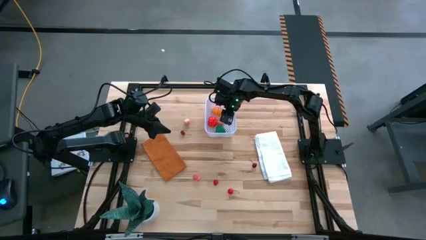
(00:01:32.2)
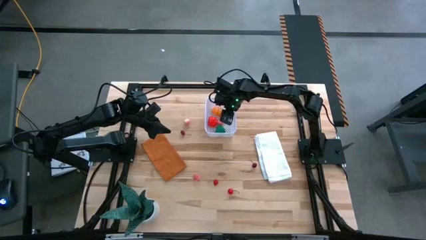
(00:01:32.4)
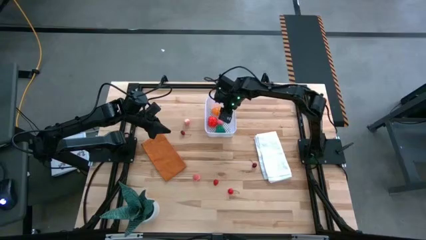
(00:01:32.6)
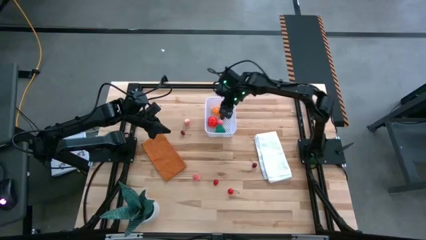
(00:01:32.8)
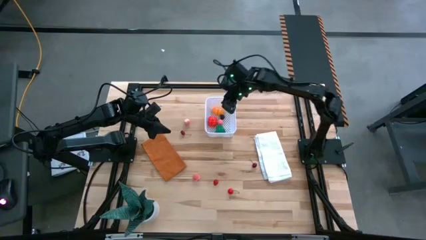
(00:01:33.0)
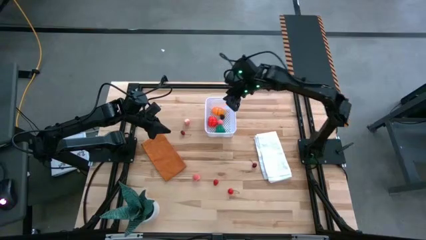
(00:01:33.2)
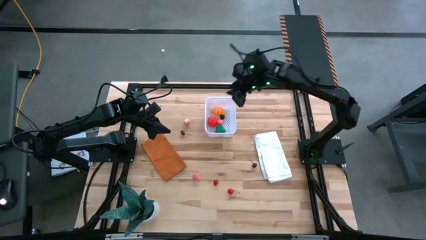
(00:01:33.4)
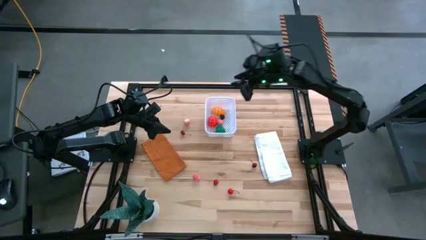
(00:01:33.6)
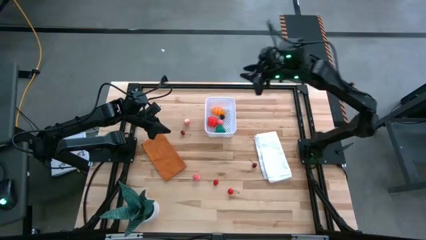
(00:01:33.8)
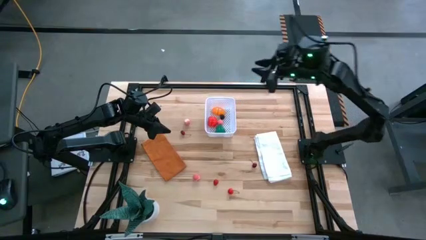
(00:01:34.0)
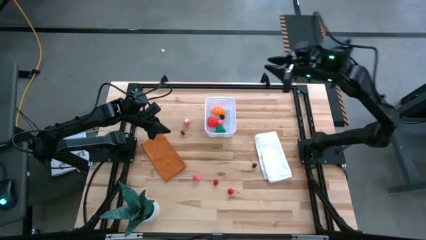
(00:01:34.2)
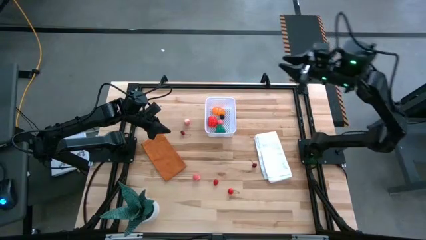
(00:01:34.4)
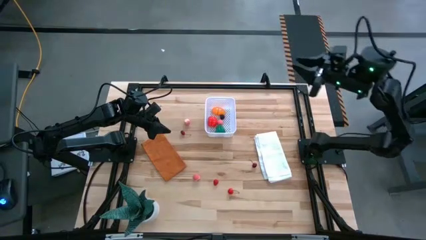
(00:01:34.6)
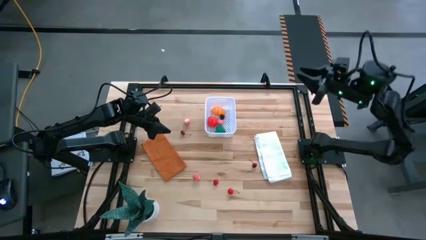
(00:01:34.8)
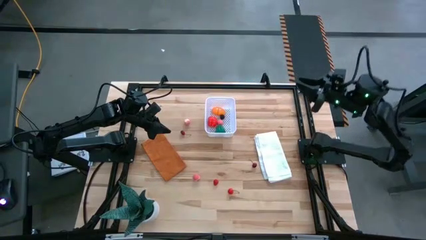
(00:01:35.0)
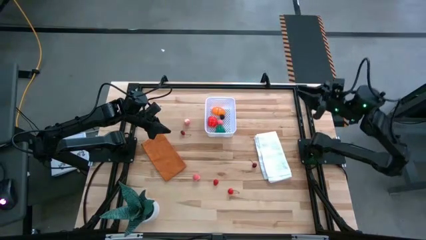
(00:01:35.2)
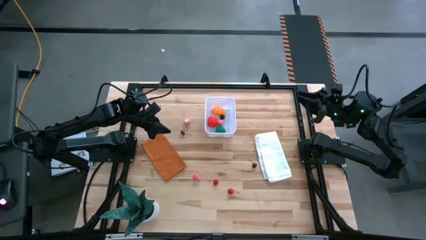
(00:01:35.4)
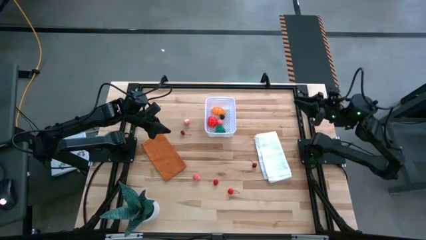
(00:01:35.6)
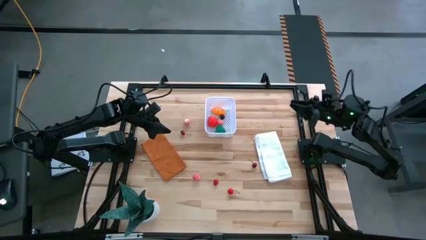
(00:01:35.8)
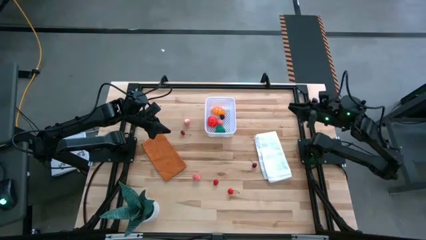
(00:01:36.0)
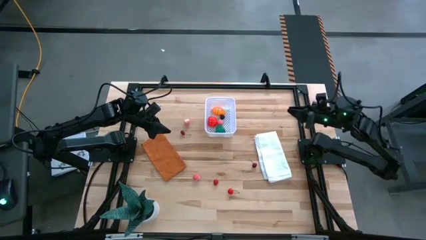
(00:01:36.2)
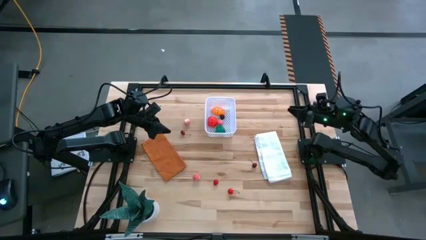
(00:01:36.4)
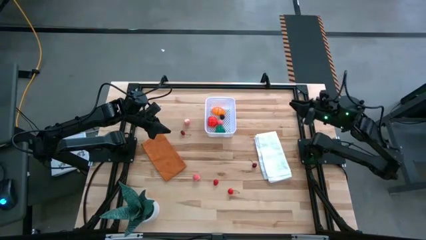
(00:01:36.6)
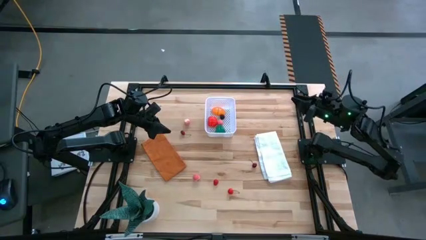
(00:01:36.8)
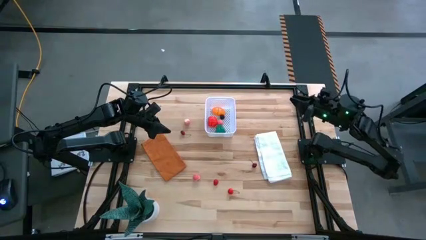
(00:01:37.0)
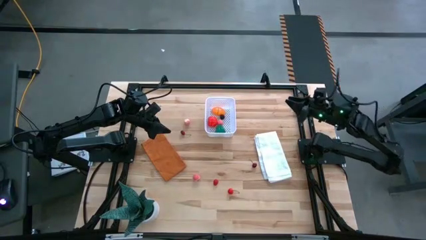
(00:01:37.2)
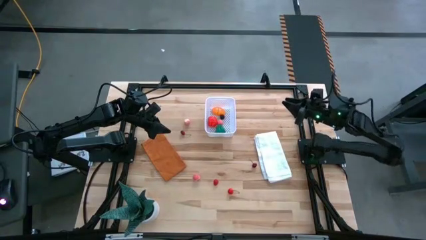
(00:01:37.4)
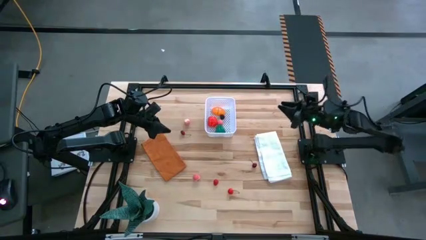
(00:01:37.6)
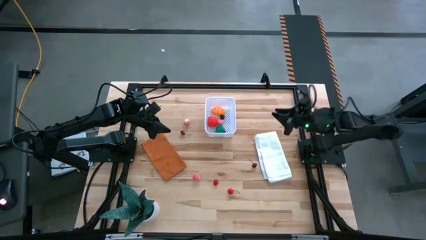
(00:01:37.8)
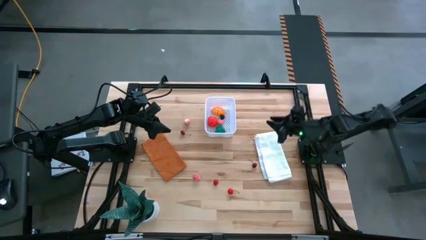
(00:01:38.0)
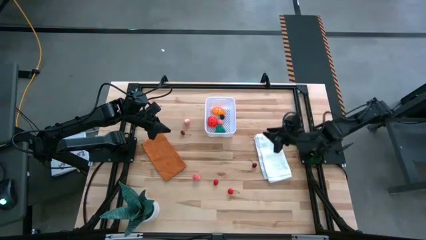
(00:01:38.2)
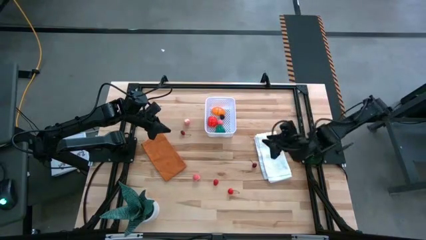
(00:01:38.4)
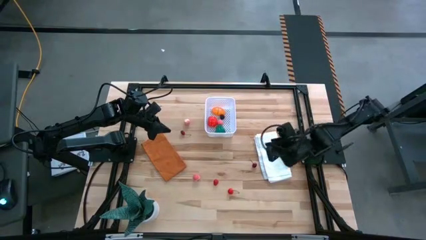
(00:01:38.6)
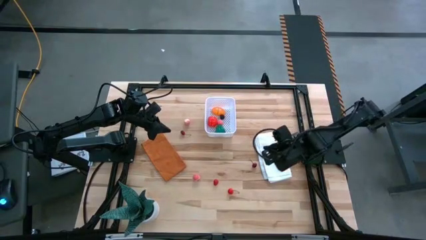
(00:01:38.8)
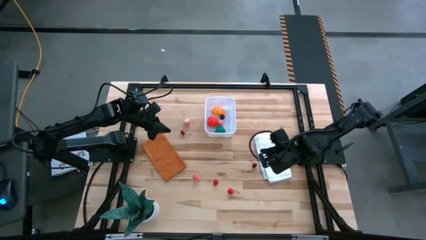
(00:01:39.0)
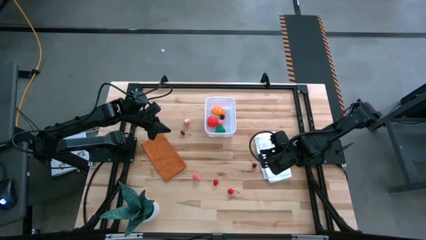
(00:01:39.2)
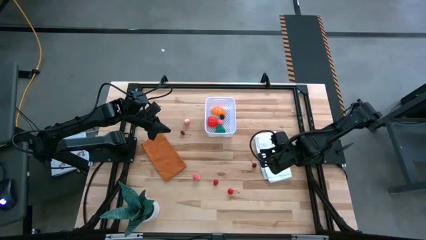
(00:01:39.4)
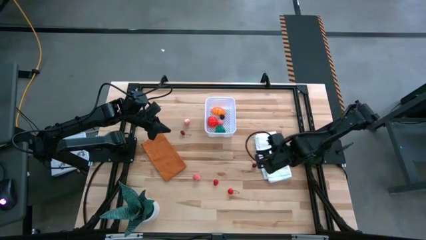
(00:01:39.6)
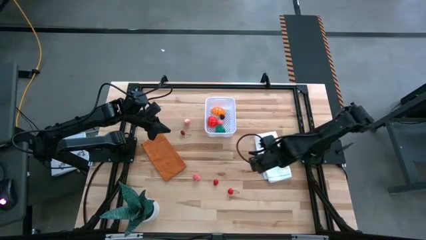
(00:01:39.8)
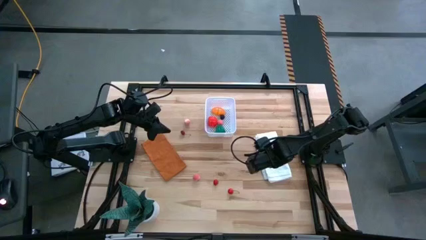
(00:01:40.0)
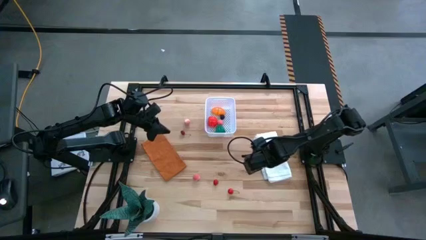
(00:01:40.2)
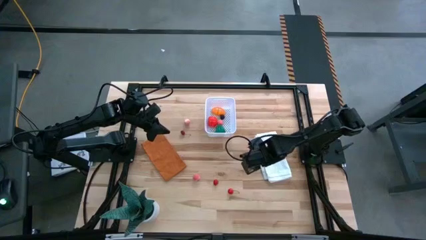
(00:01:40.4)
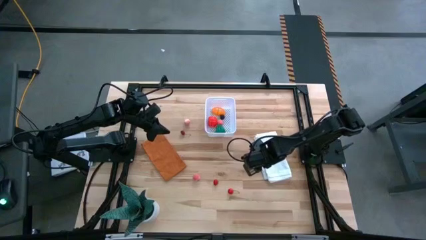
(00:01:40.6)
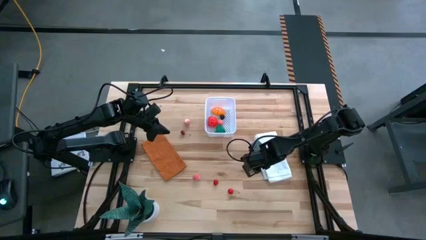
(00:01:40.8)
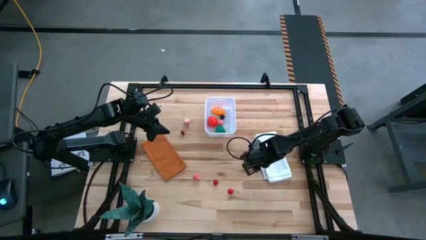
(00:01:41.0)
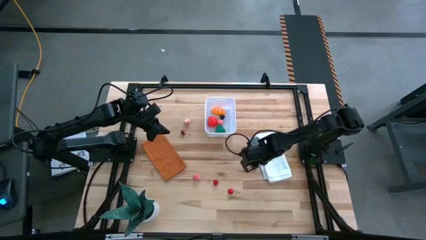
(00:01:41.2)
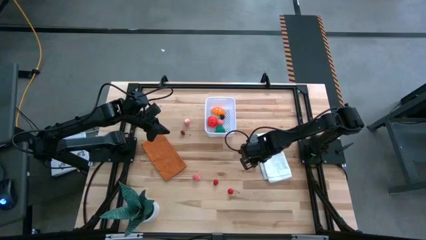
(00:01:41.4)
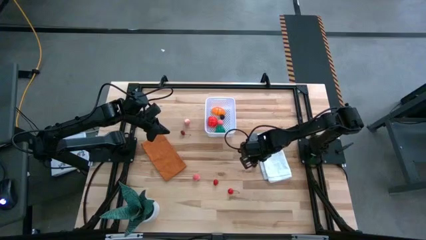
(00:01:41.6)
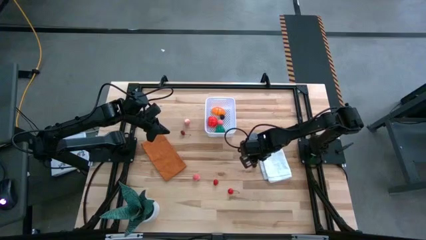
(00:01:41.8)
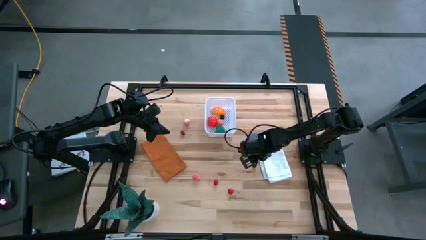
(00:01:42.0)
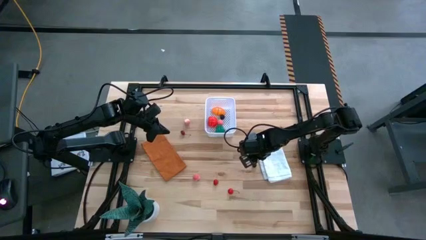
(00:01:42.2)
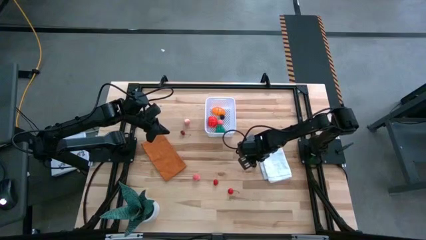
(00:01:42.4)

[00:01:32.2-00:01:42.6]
Task: Pick and placing Produce into tupperware
Put the red cherry into the white bin

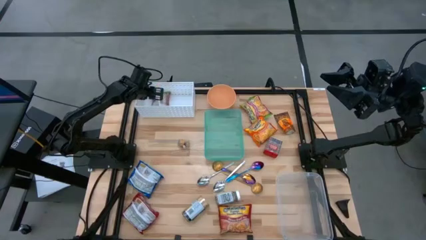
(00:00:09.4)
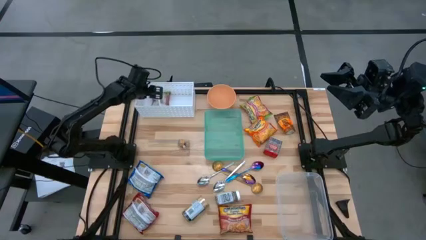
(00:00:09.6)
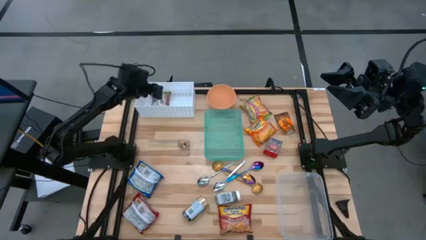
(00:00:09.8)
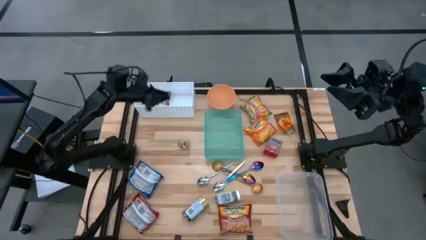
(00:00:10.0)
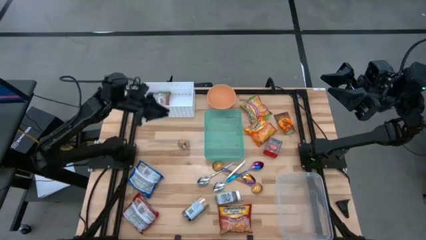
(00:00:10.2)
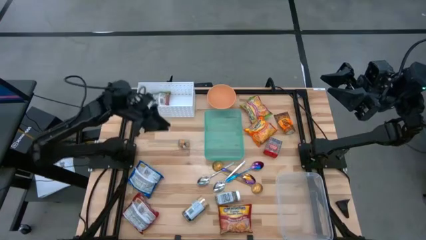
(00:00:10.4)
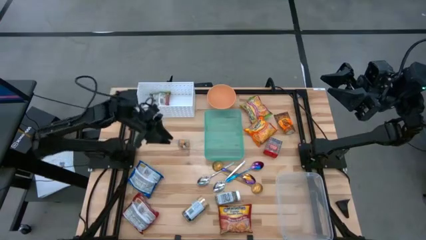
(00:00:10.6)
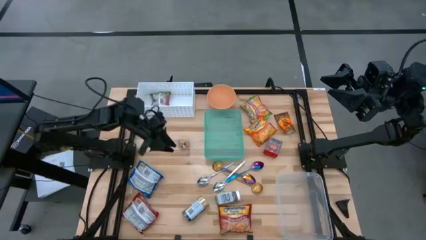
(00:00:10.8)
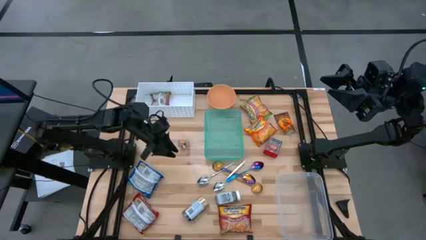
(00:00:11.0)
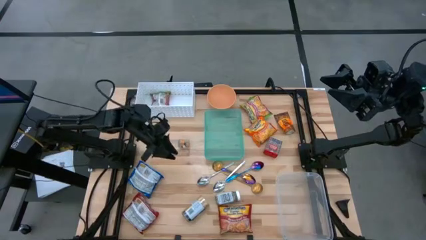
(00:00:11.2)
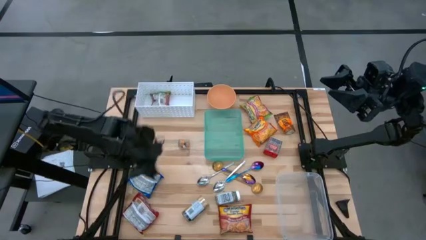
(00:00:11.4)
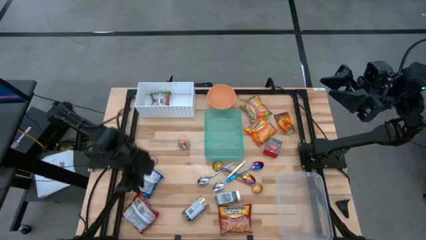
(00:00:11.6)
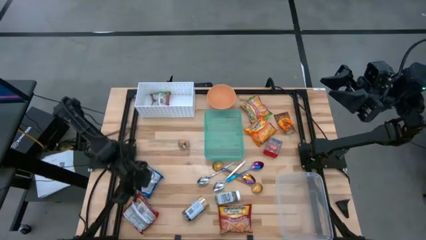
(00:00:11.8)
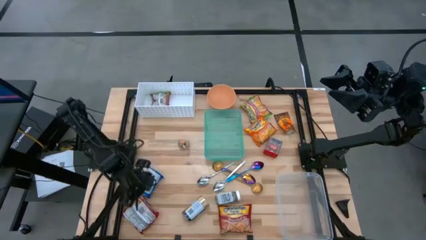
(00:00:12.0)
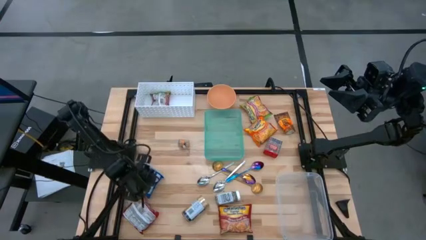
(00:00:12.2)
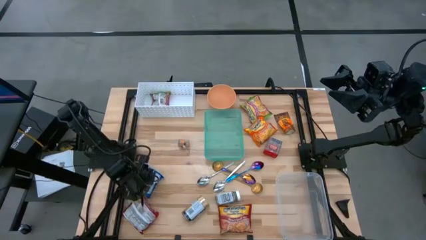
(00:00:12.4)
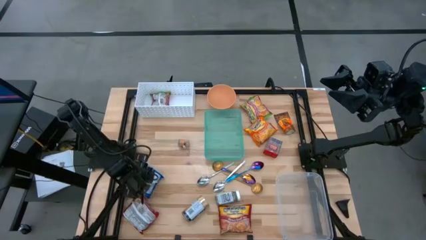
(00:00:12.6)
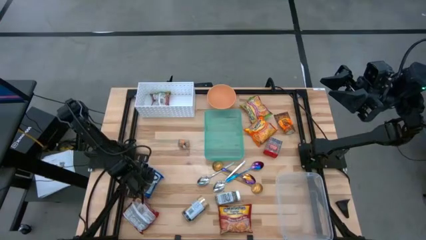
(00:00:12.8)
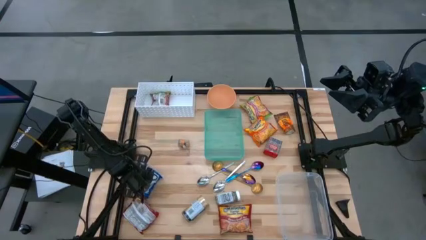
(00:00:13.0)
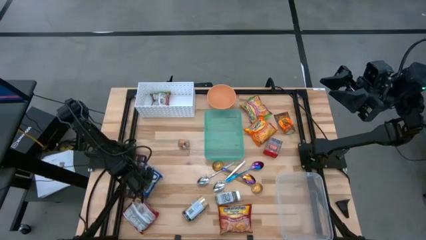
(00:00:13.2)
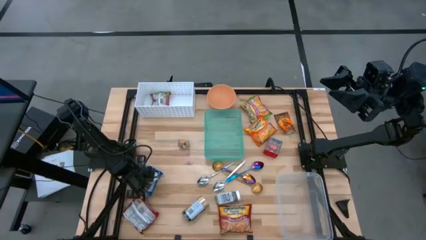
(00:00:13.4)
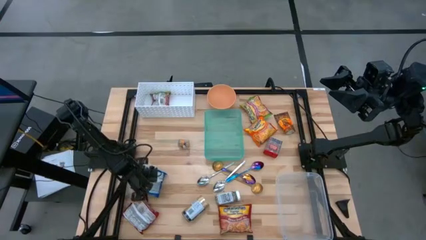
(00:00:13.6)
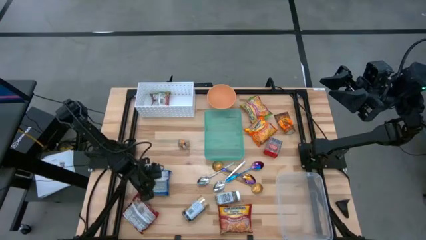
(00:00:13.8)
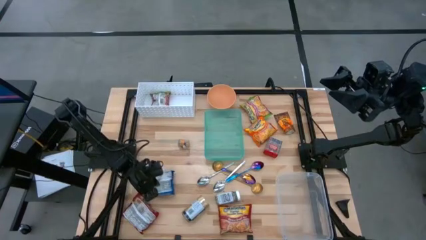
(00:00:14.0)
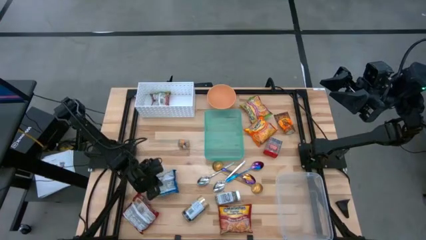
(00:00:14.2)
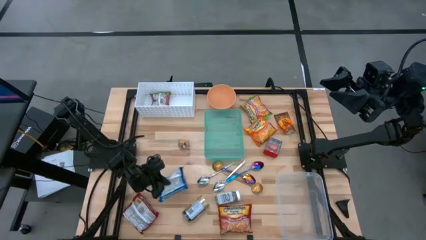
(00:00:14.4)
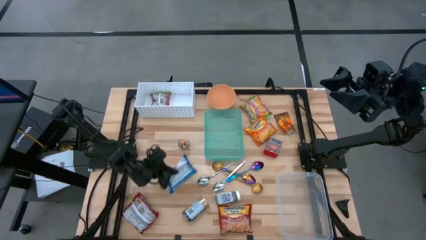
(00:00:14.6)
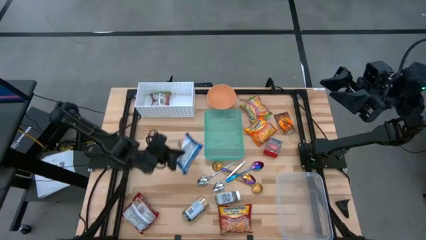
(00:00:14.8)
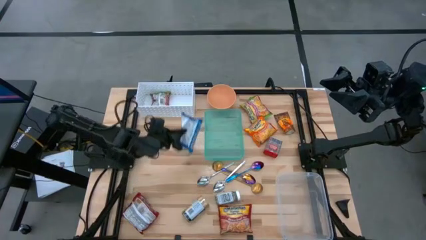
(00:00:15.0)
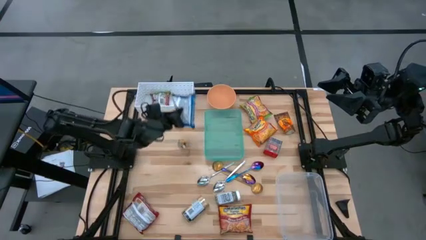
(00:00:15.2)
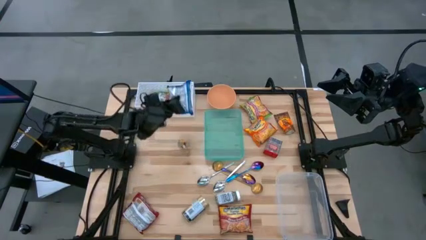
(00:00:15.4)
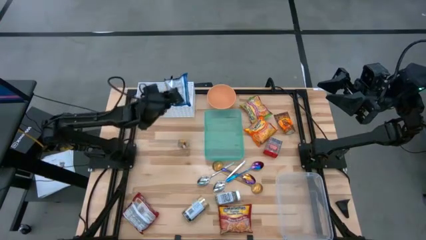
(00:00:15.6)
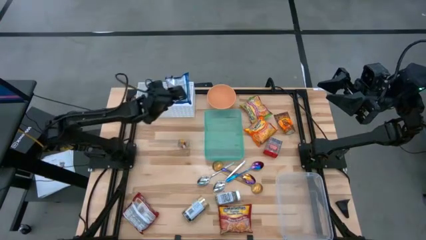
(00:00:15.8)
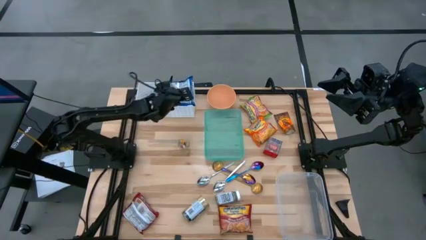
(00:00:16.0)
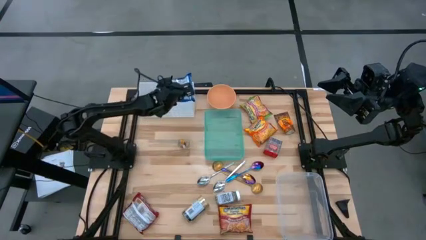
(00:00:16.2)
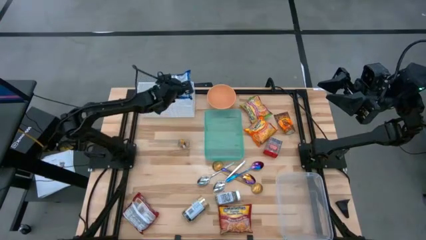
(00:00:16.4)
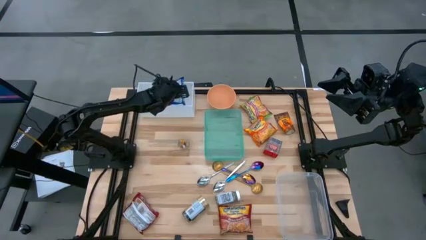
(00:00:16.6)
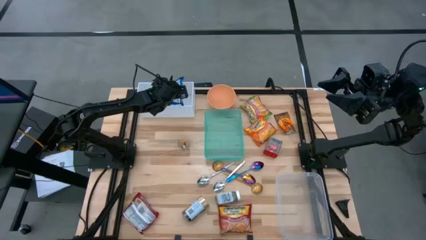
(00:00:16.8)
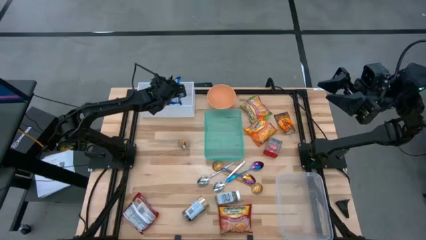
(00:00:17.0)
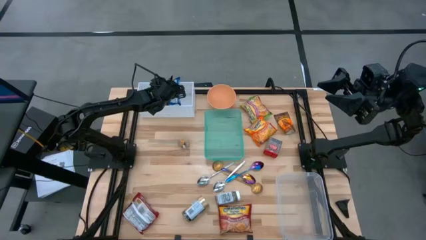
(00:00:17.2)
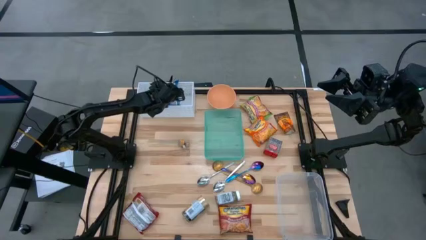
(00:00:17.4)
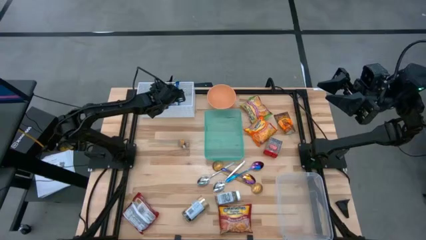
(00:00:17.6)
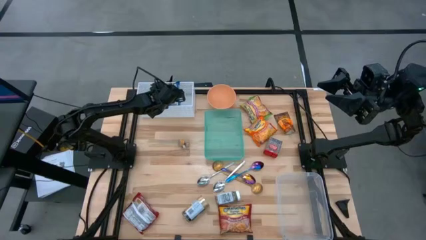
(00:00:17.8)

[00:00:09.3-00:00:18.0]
Task: Pick & Place Food Item
Put the blue noodles pack into the white bin
